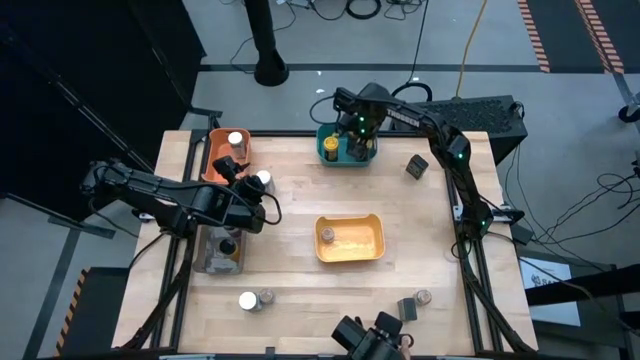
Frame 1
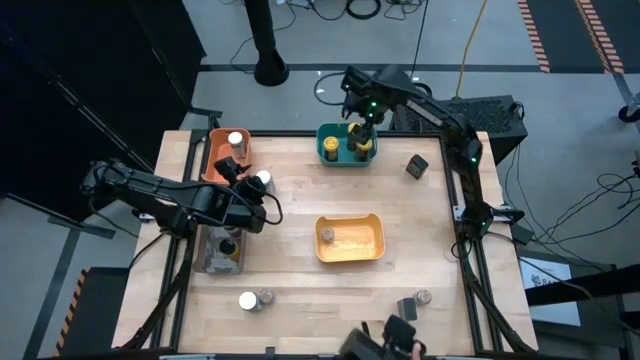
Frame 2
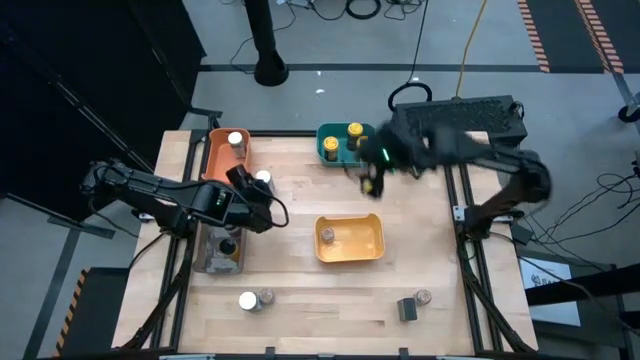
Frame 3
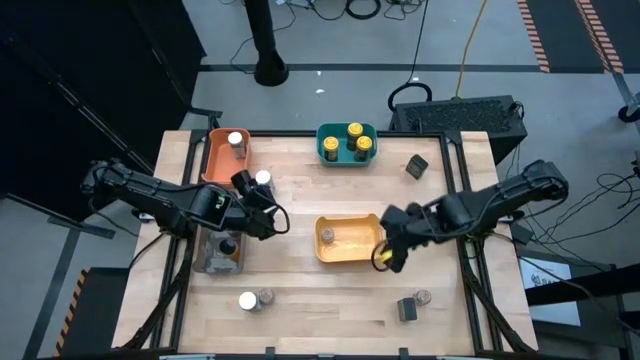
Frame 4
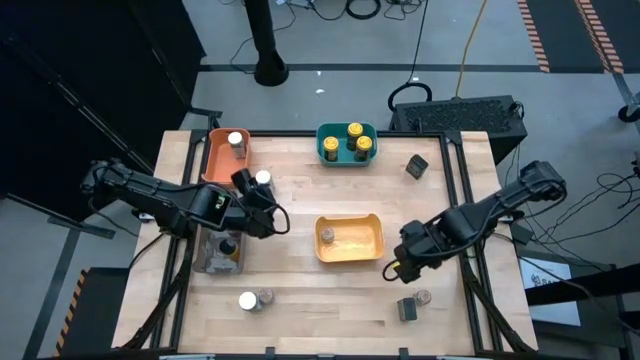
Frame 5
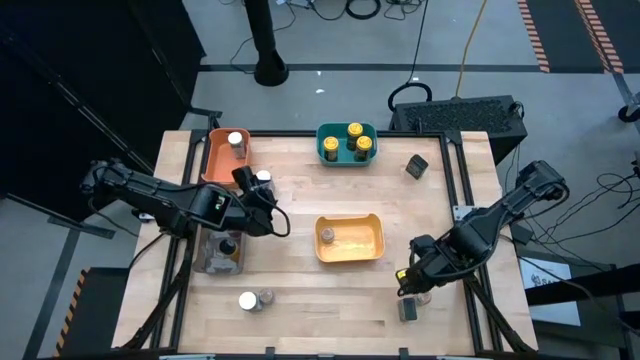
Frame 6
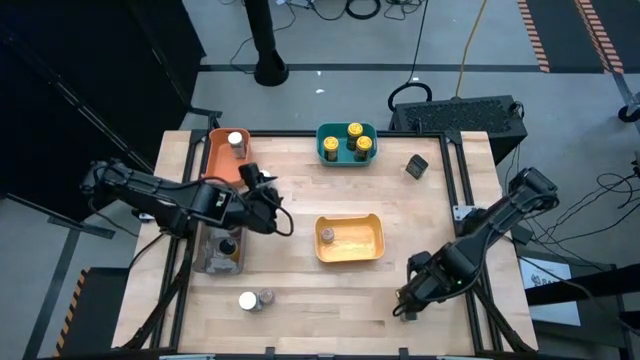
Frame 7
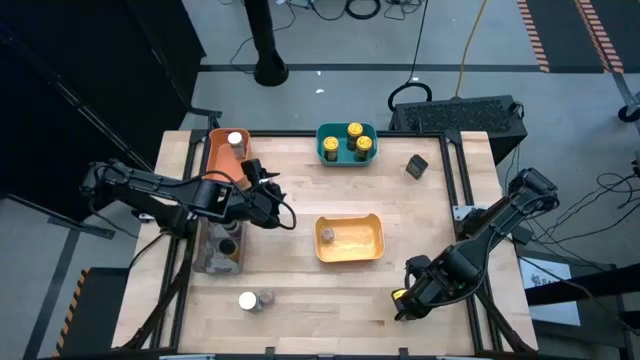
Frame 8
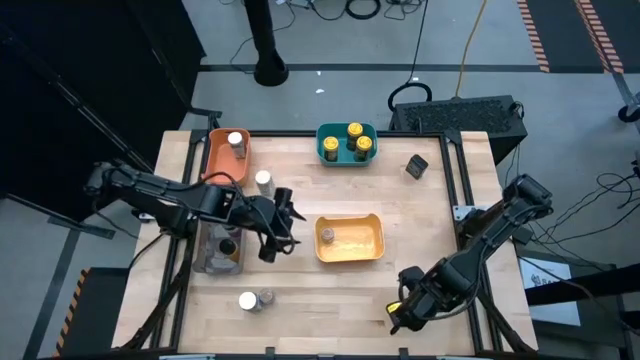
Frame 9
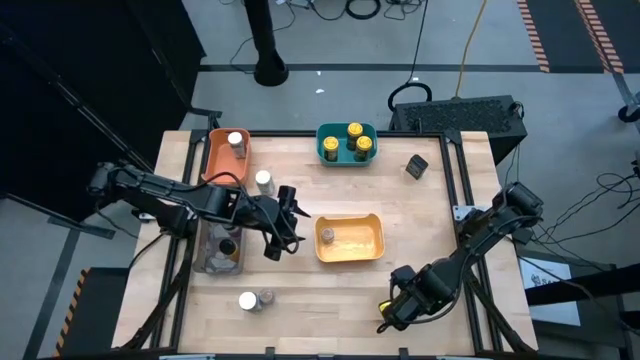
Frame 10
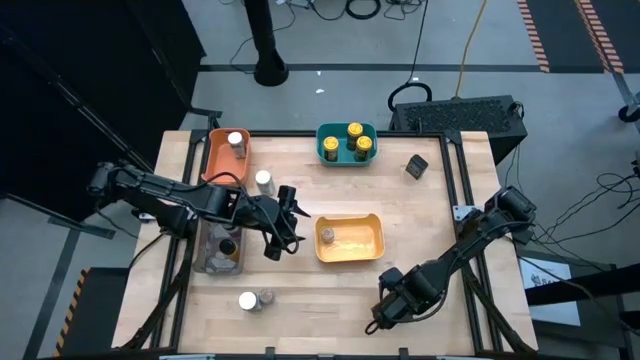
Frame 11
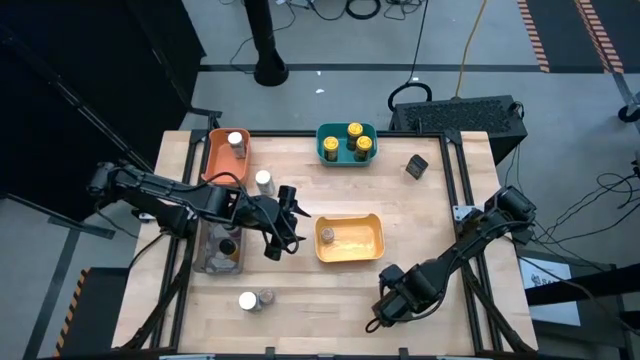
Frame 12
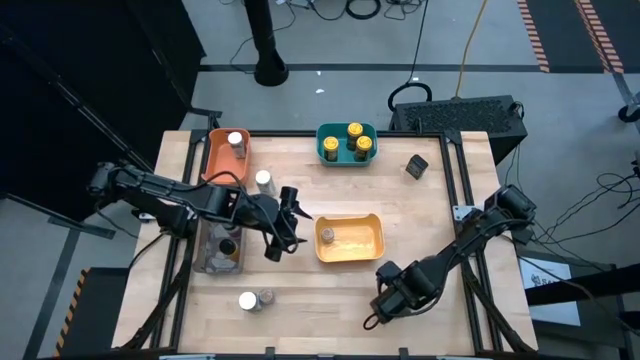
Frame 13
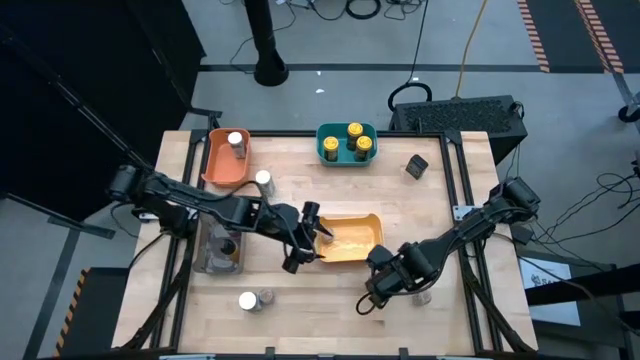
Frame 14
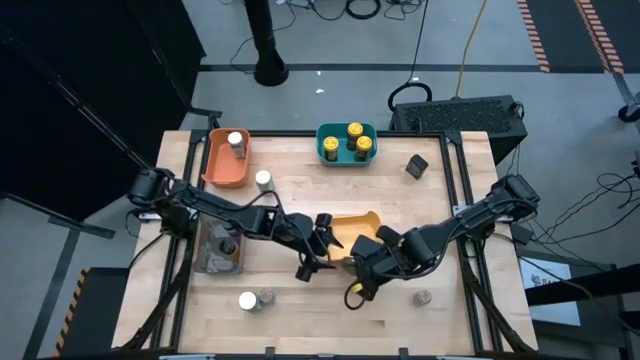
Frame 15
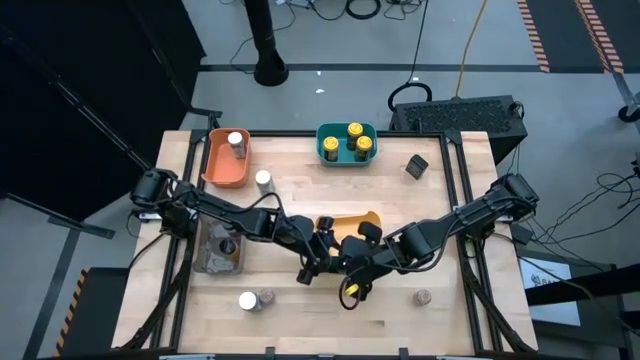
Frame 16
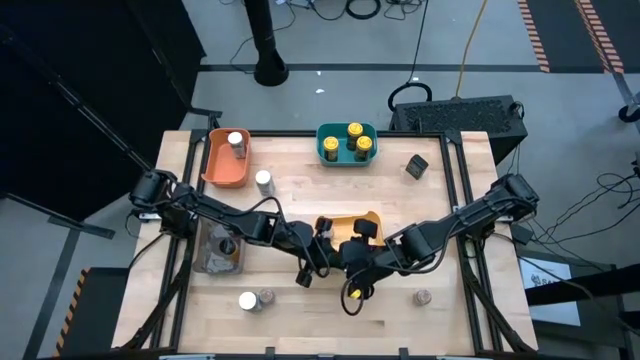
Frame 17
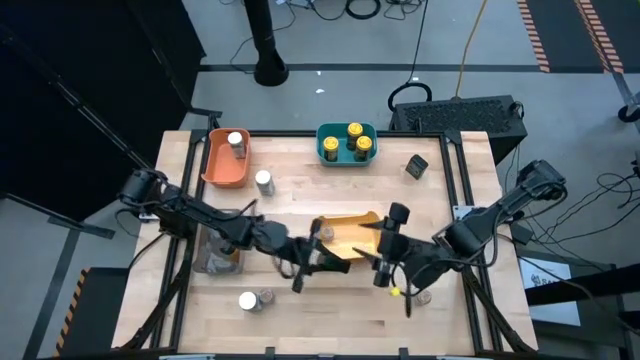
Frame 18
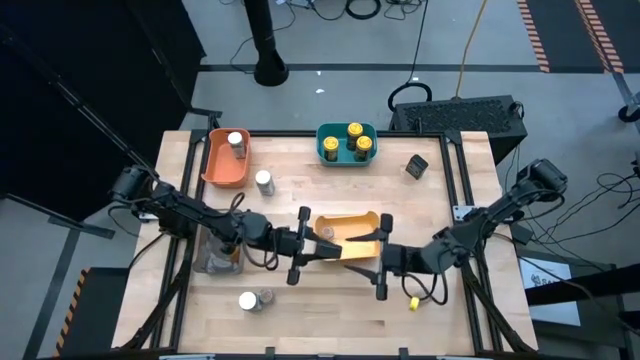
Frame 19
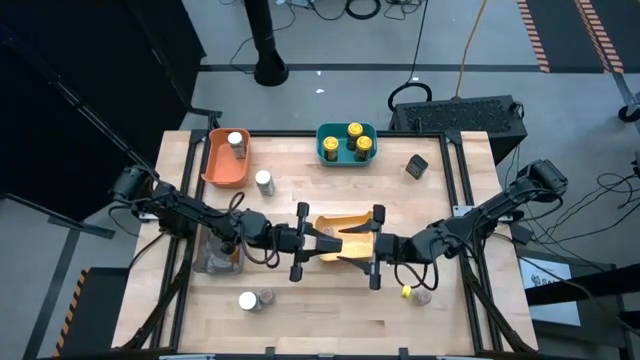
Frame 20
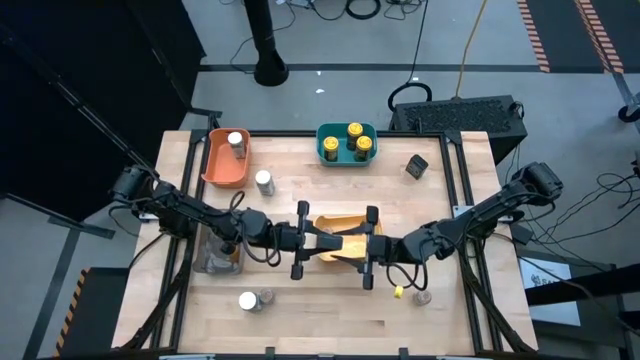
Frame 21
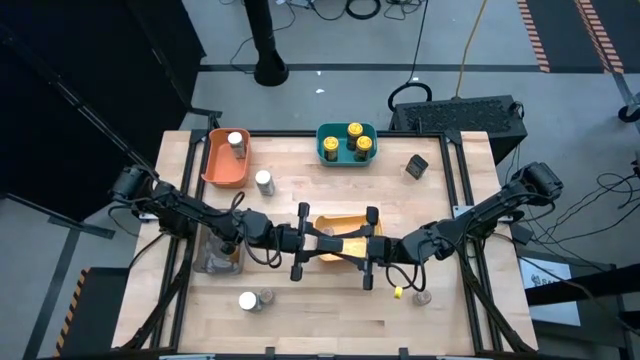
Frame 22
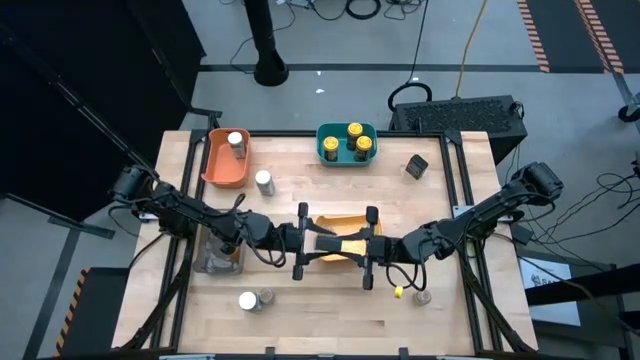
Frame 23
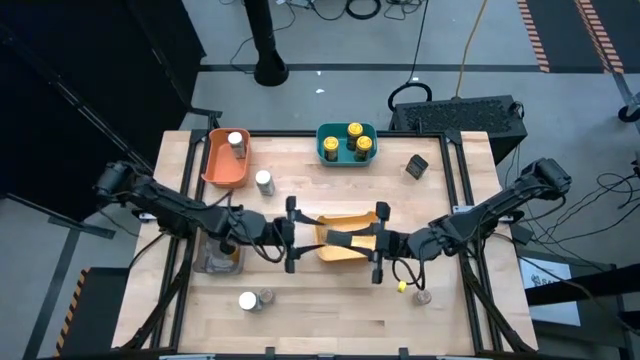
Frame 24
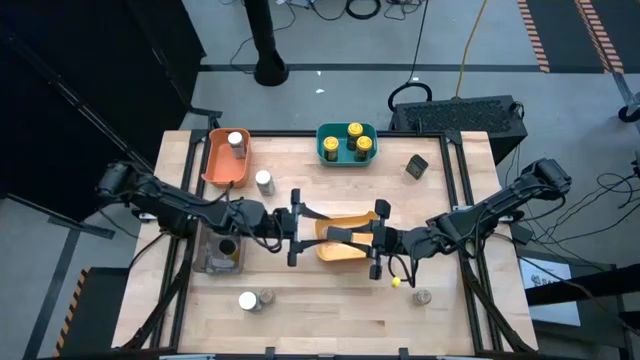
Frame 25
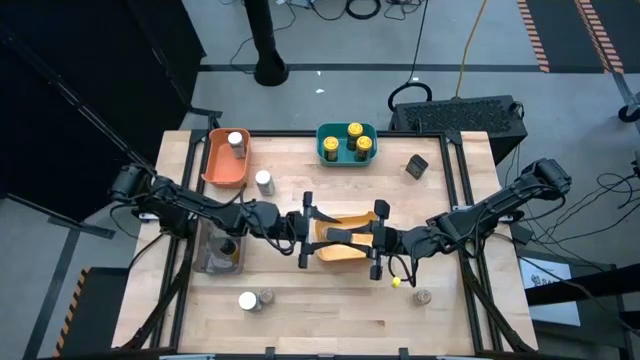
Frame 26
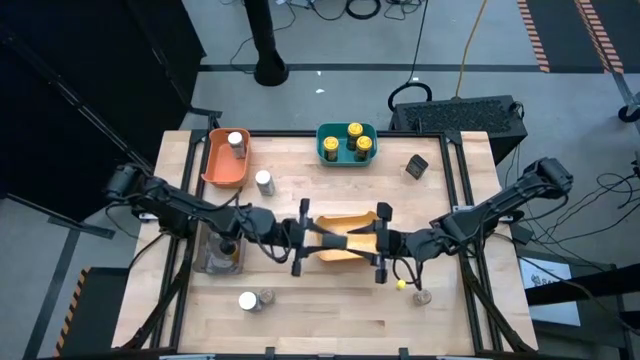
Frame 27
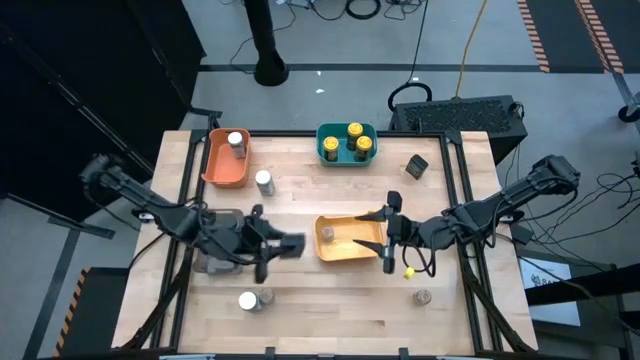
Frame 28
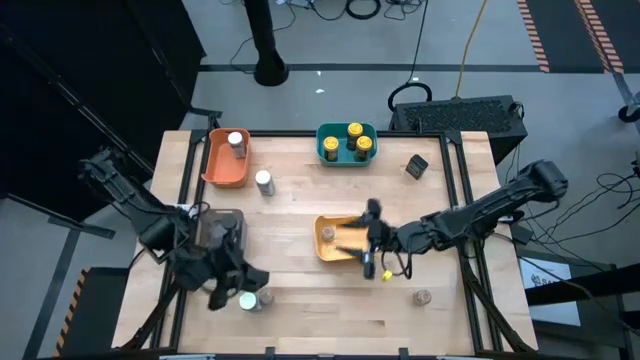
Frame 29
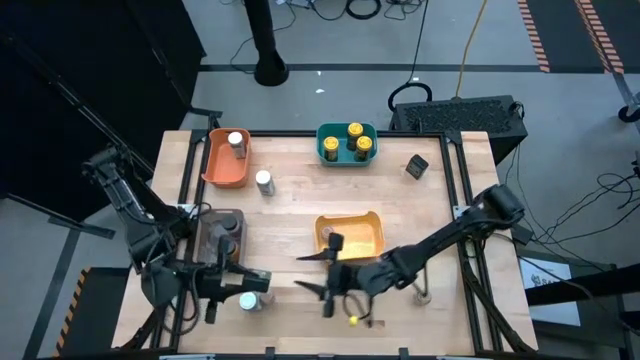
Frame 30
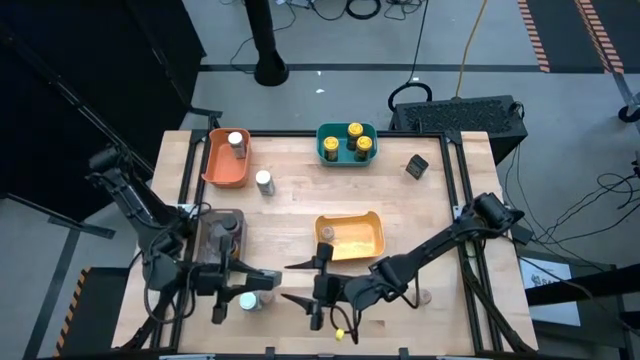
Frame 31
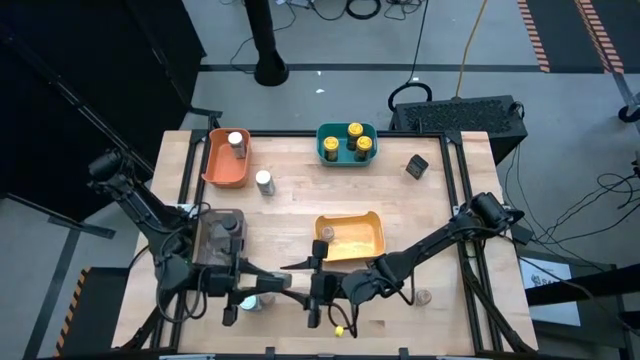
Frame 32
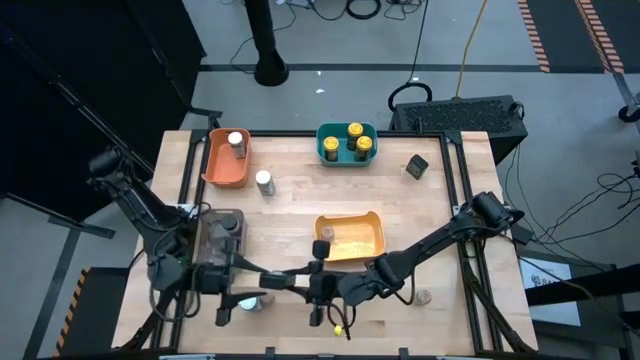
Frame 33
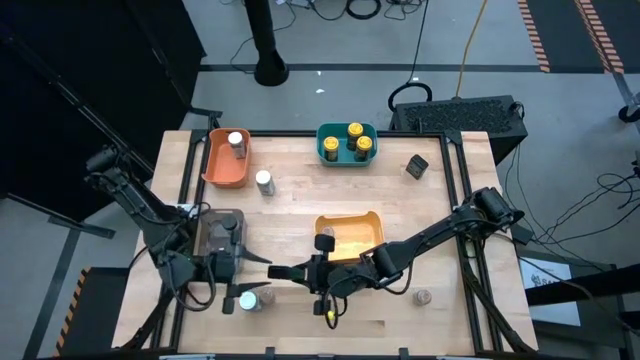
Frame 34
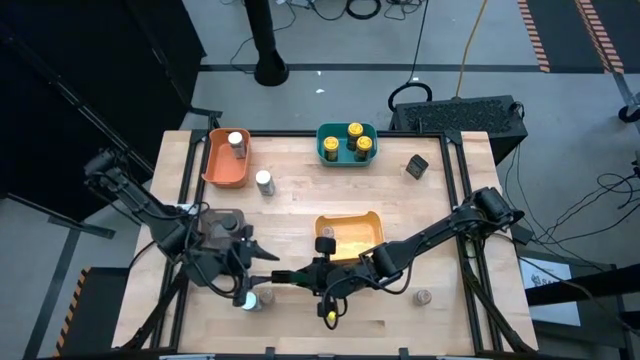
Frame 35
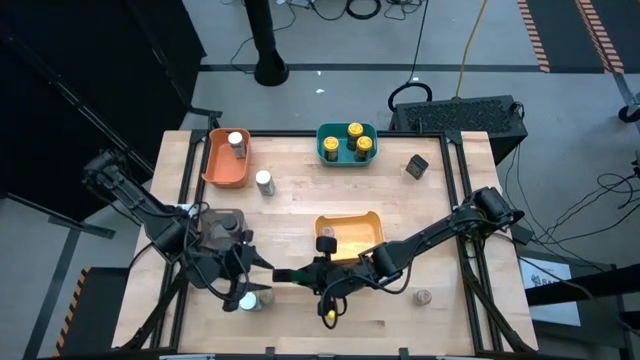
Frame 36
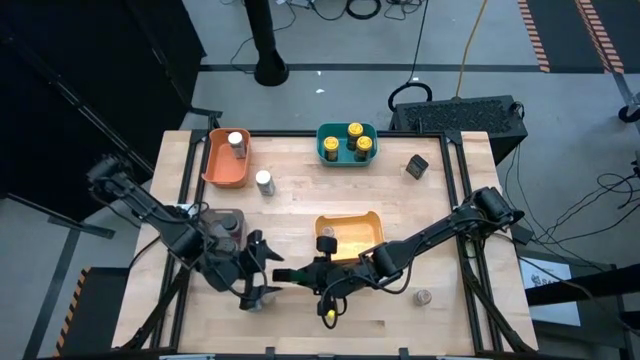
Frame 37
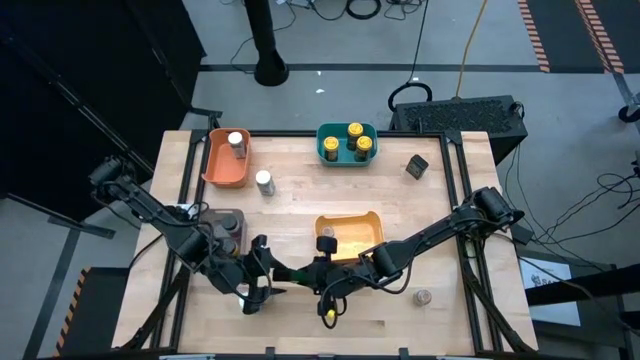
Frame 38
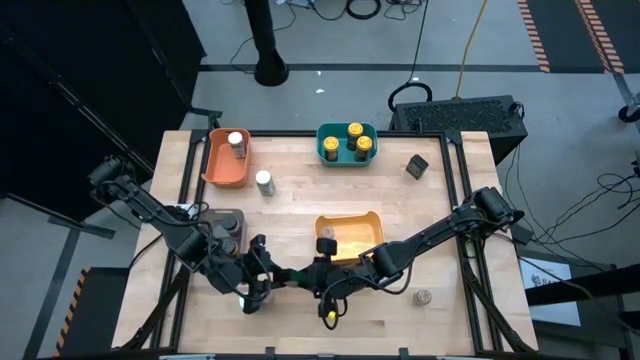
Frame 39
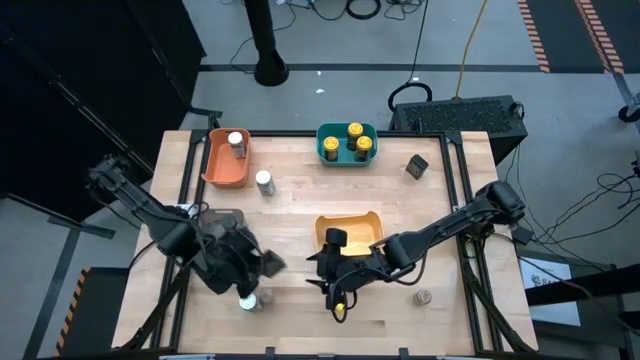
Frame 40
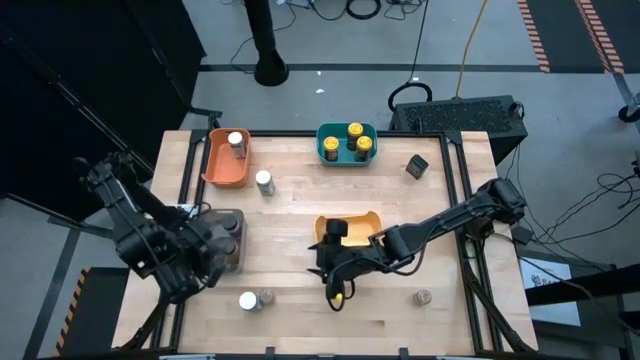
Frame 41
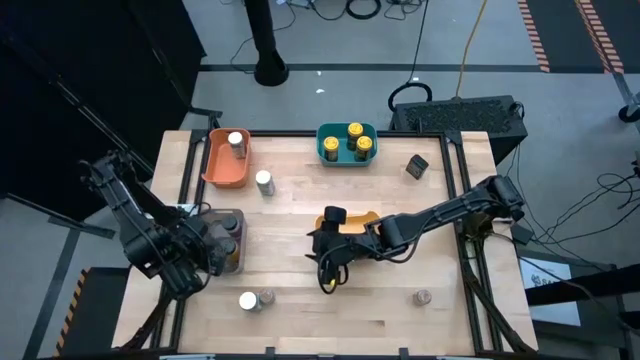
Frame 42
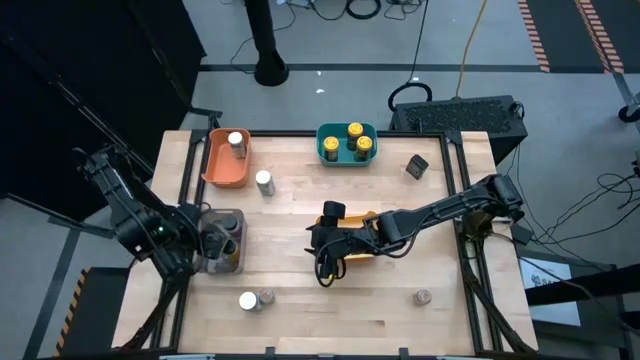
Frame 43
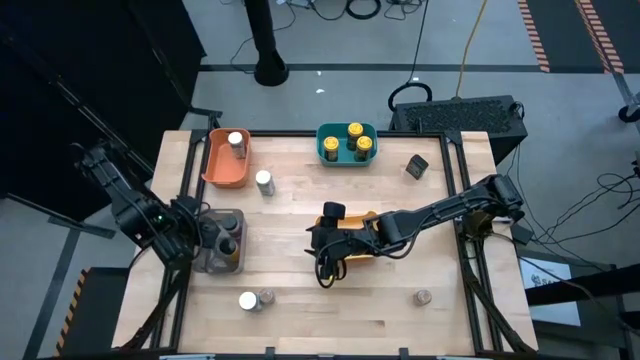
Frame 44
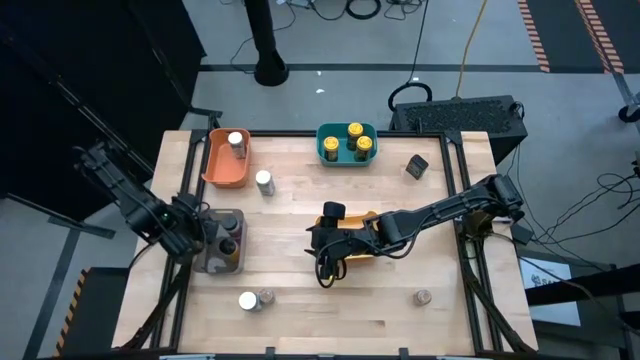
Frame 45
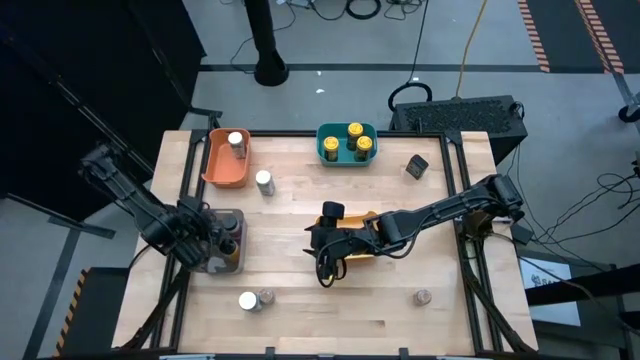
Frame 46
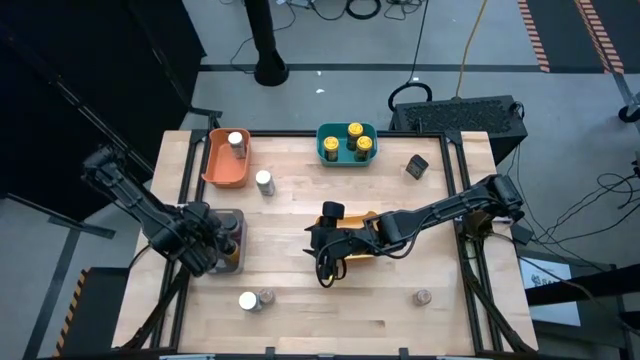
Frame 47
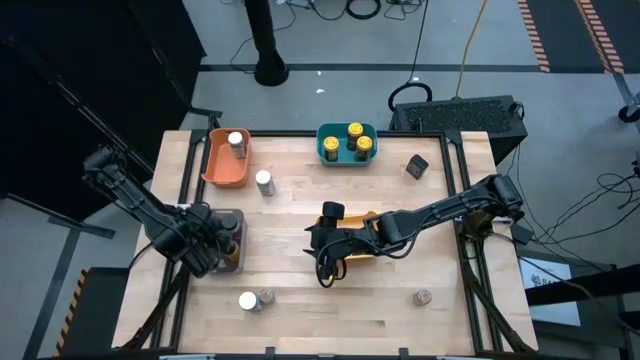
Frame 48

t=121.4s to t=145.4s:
Task: Sort spices by type
Put the bottom black seasoning can into the black bin
